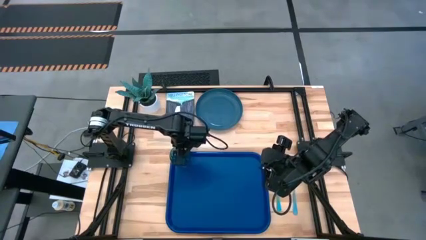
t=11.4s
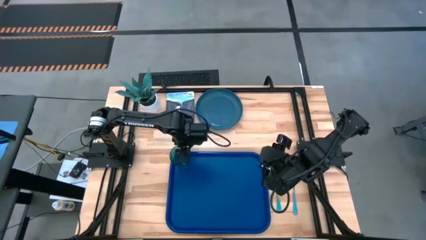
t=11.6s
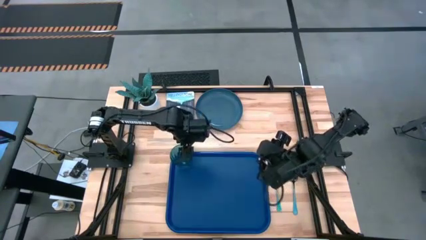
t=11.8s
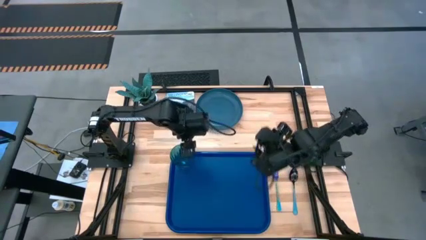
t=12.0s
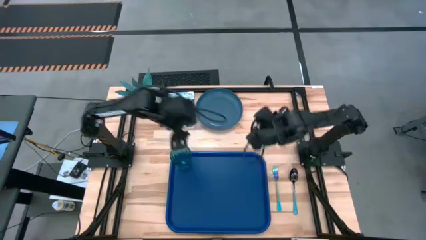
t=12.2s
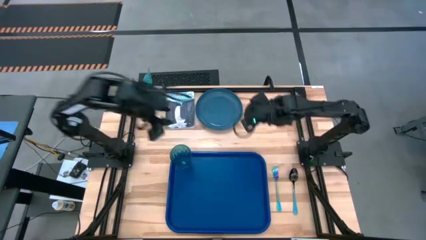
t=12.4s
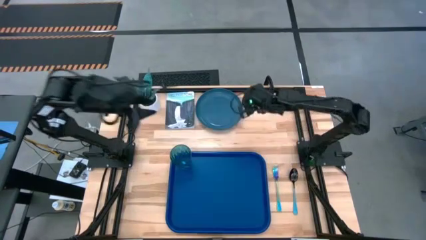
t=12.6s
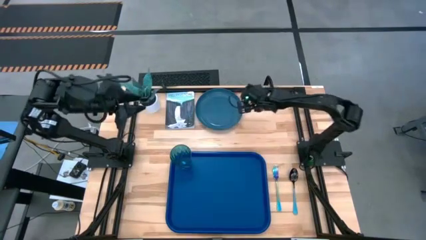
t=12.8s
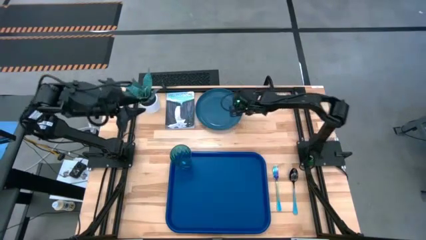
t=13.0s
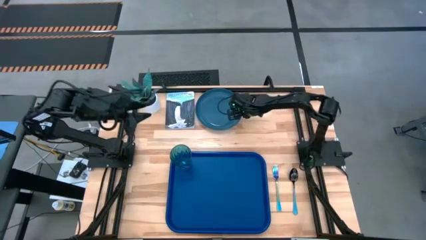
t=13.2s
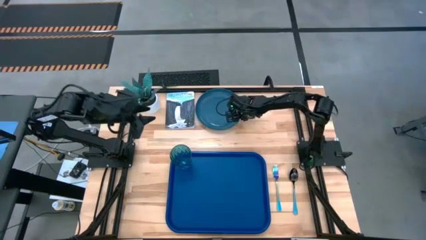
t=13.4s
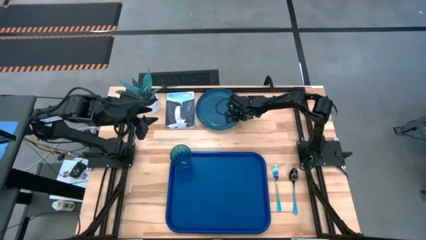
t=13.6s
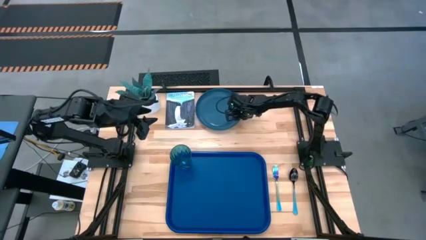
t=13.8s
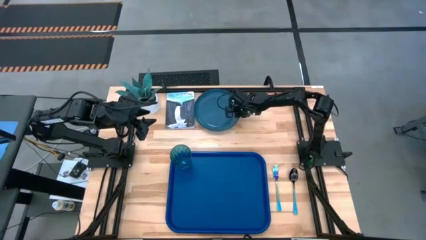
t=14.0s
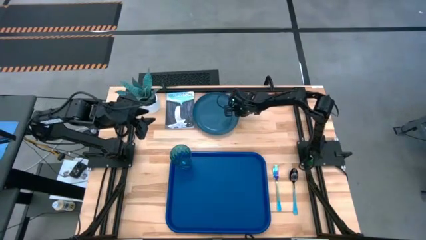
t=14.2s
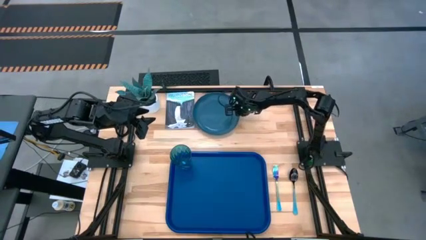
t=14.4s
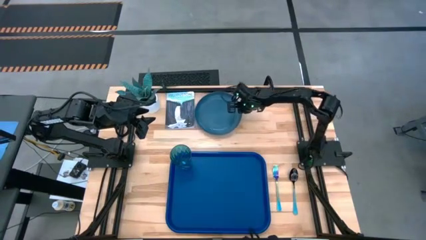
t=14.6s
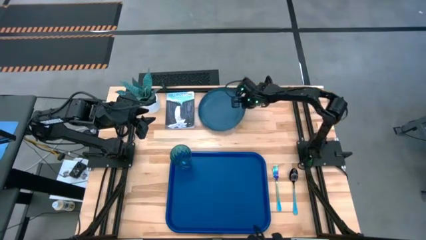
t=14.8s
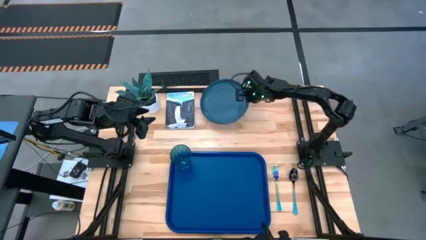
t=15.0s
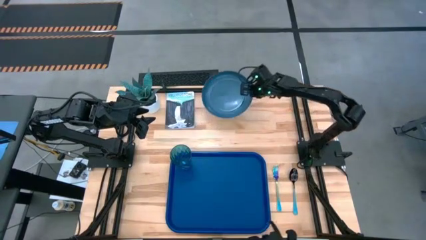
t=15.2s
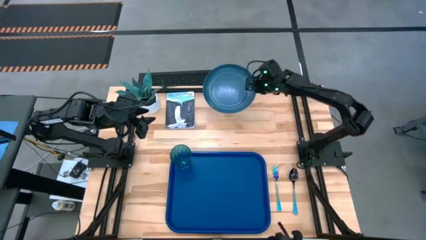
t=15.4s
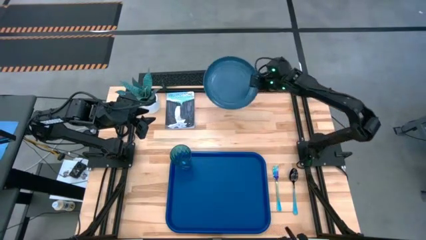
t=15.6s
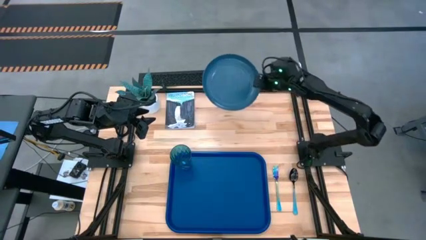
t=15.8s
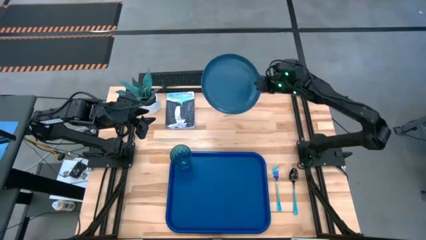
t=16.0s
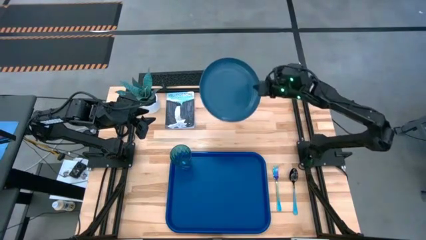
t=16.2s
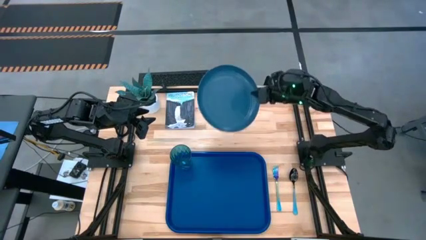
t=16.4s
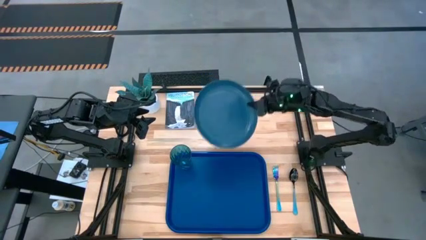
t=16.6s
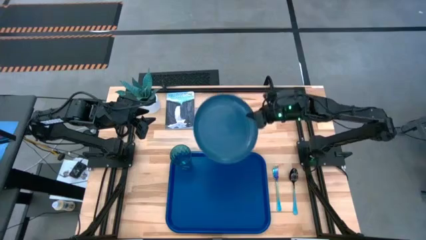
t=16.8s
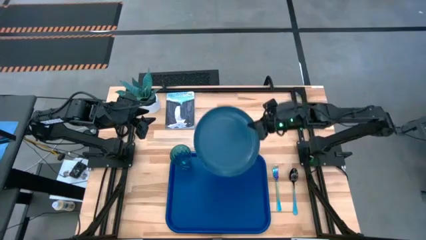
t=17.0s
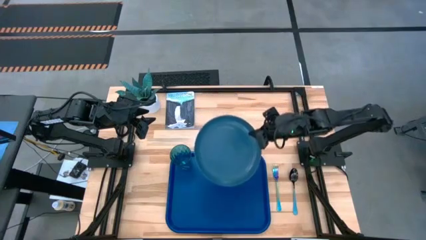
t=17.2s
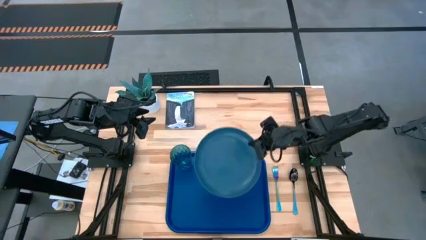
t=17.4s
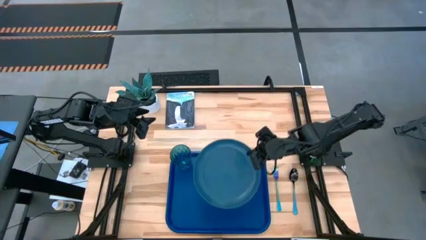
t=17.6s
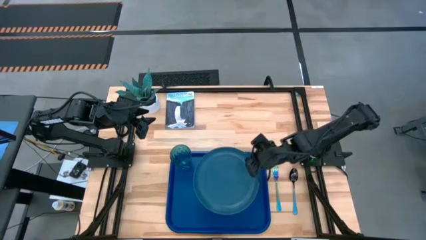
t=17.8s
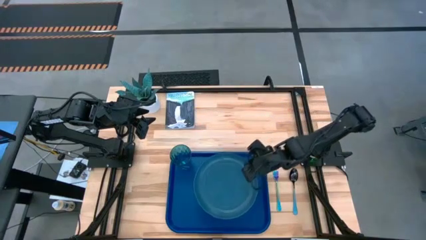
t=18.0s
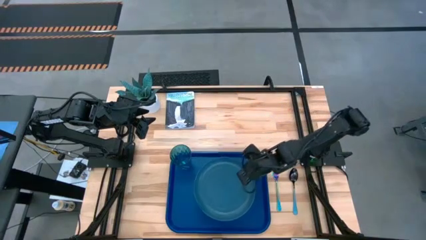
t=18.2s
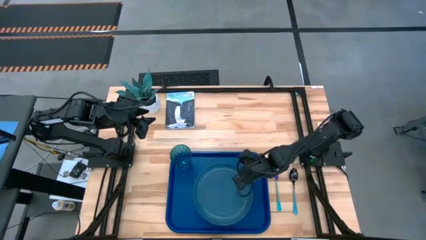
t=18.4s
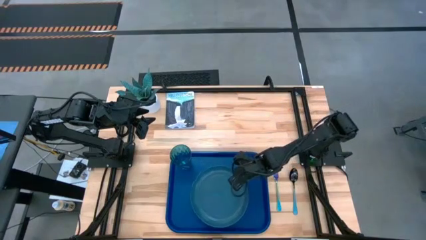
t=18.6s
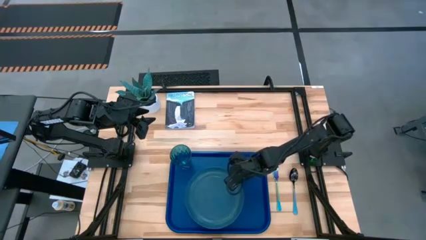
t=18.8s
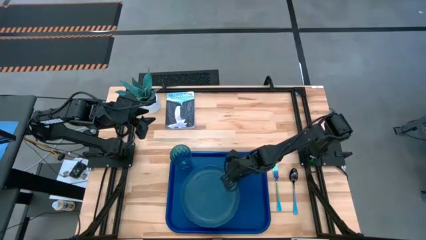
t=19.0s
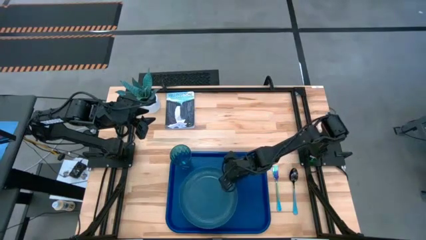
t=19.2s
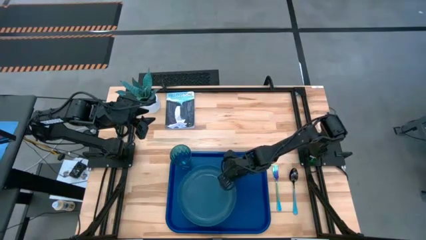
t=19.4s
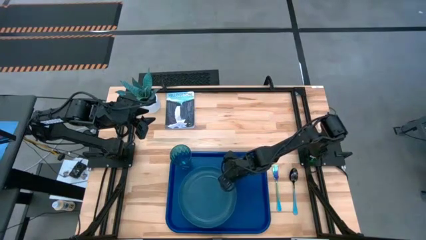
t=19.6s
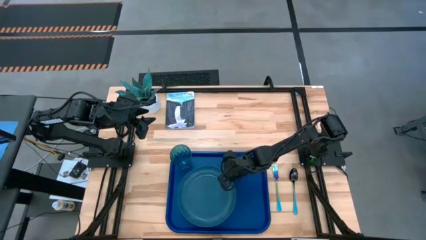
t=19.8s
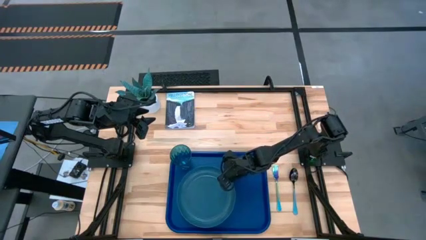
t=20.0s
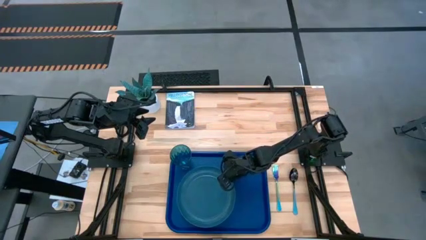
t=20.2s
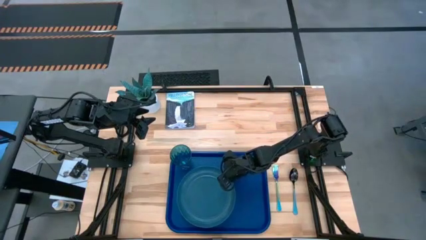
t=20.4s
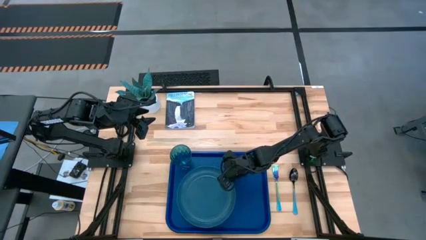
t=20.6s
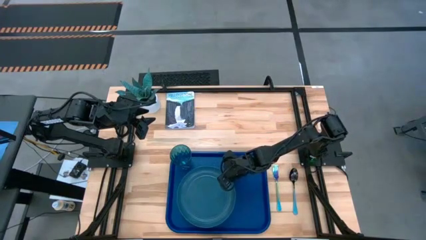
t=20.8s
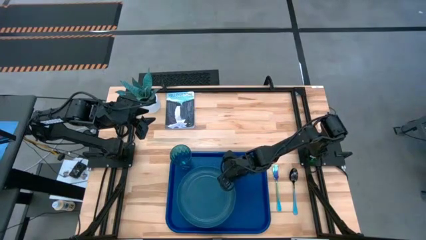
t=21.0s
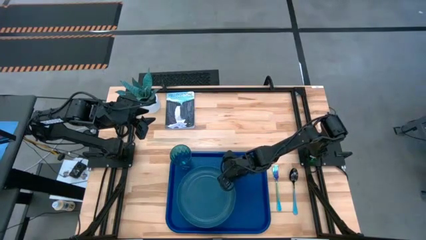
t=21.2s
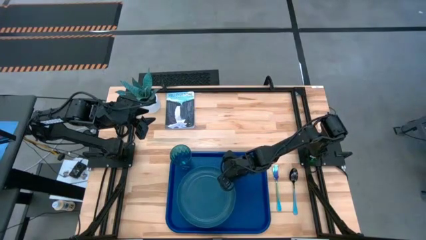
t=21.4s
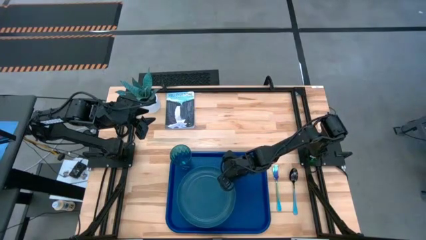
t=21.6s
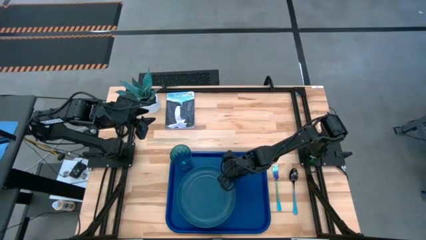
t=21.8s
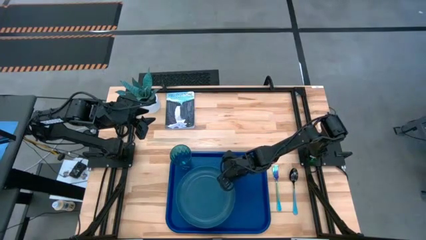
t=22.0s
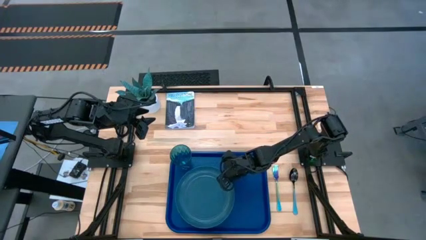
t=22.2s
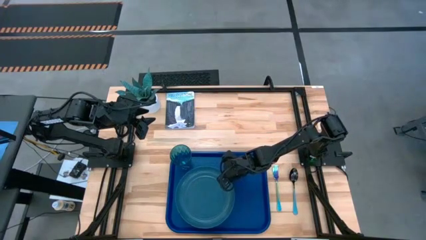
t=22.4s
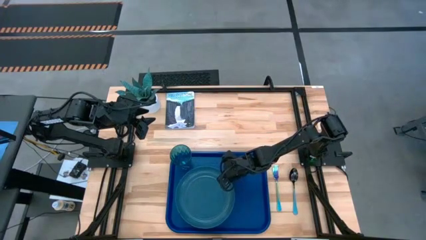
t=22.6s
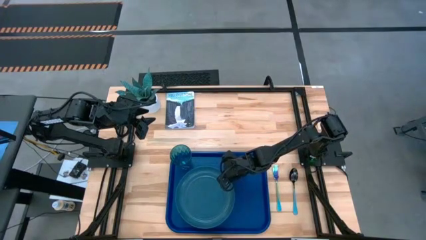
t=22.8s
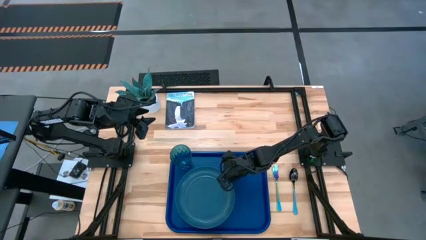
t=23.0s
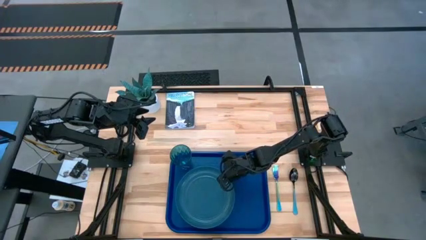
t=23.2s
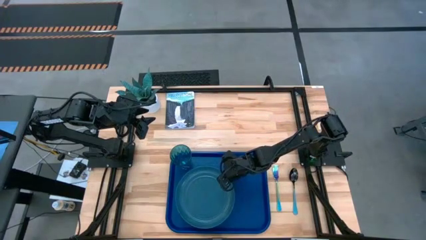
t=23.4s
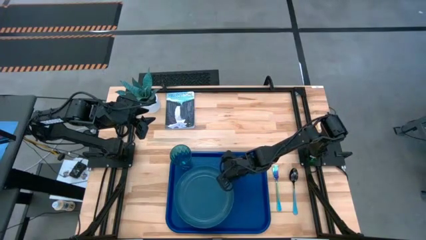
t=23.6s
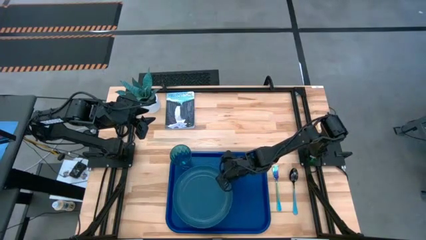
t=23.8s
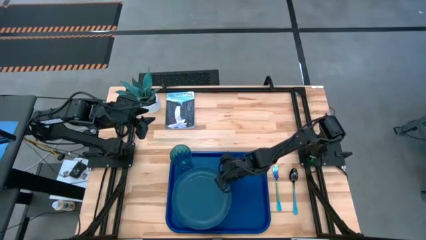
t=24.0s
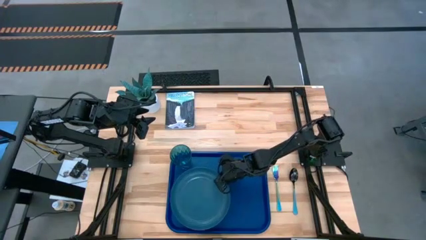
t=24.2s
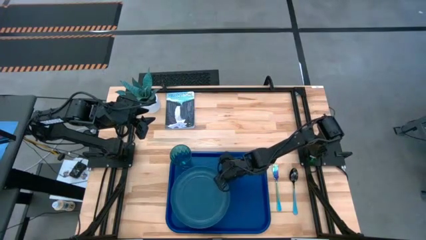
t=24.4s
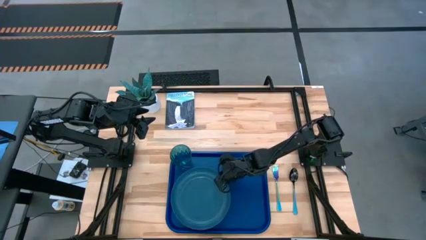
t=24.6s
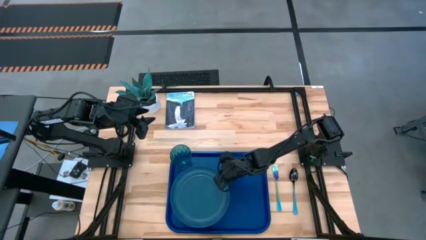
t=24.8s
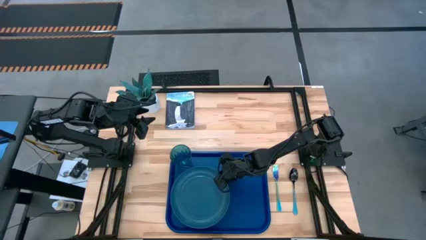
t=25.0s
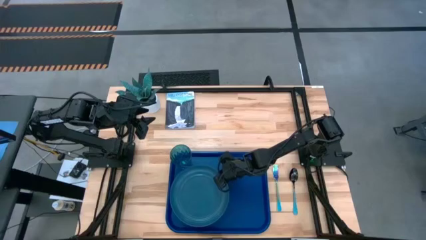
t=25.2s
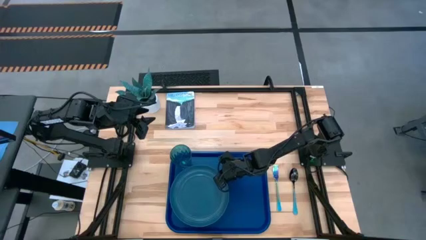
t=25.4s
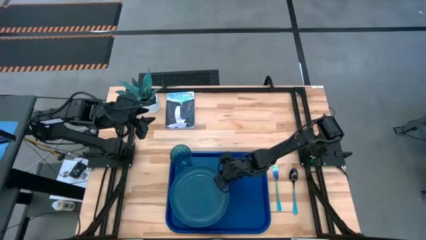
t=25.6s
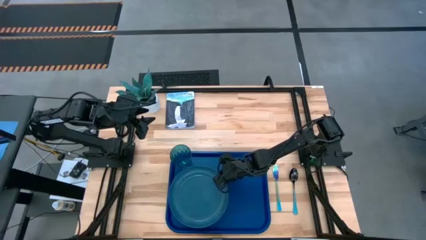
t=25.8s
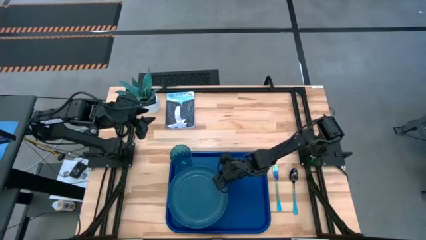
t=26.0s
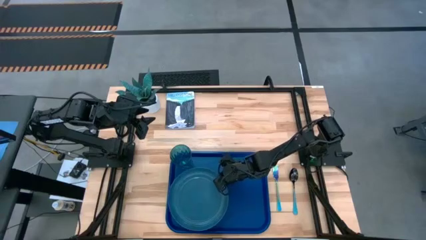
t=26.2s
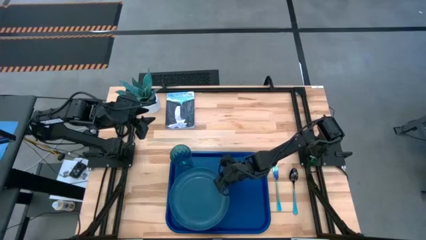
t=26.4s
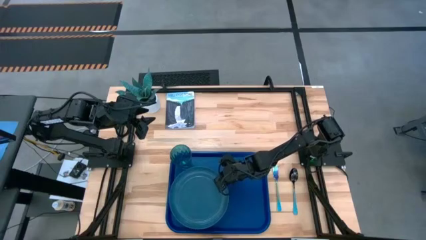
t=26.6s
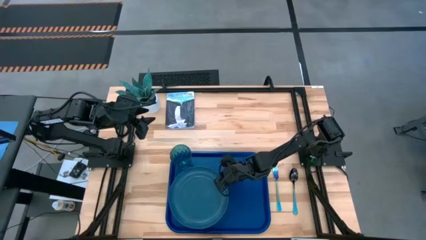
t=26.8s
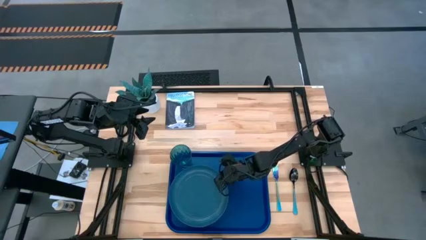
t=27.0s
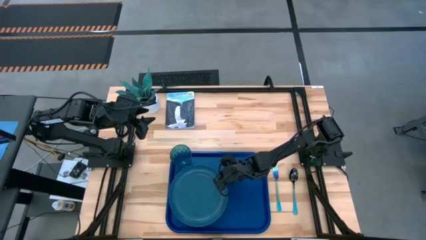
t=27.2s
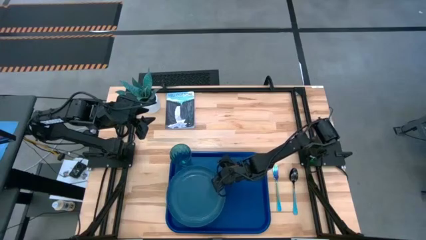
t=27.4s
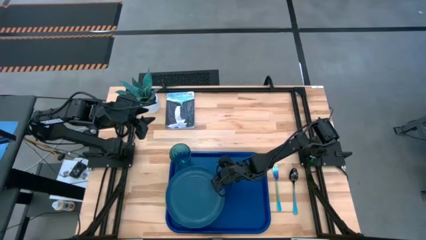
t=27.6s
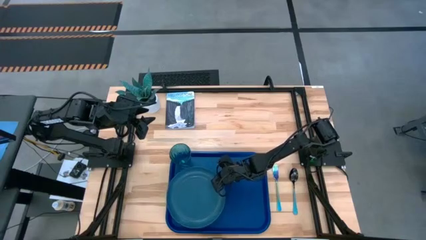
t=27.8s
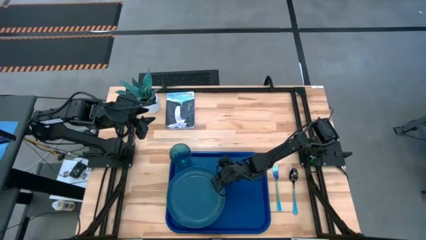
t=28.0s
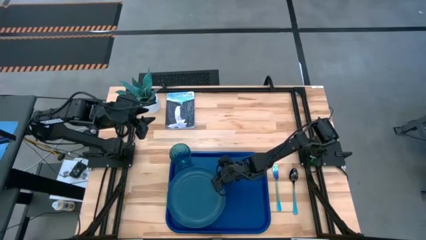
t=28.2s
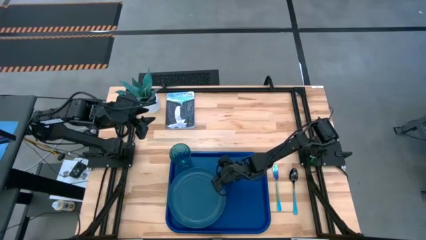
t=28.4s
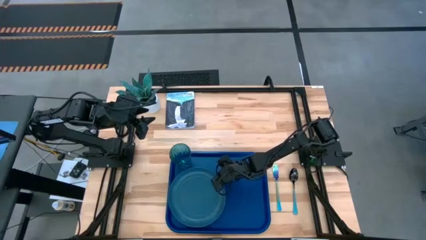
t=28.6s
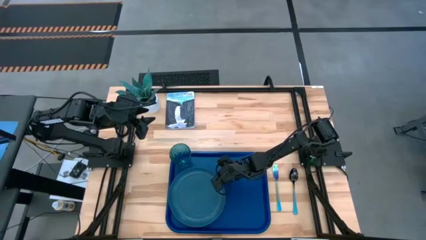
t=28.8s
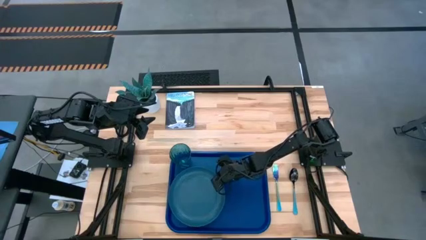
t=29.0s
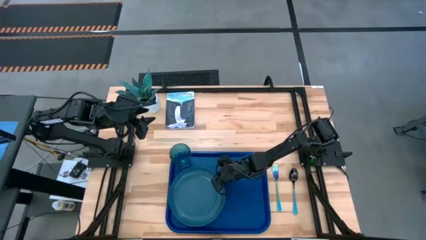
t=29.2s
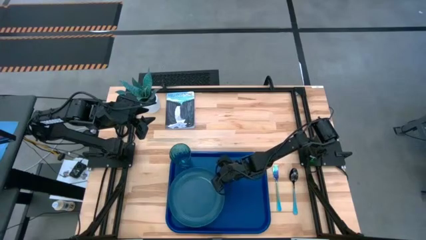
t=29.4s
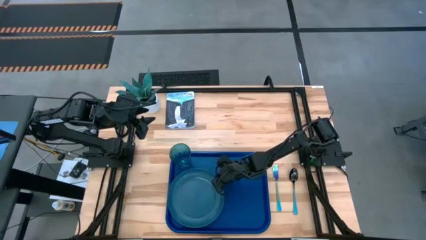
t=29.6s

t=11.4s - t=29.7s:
Task: Pick and place plate/cup/fork/spoon on tray
Put the blue plate on the blue serving tray to the bottom of the blue glass
